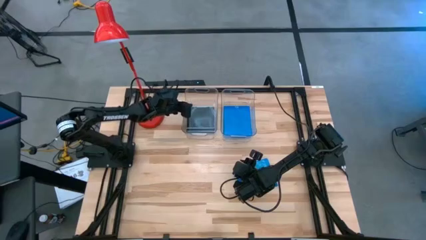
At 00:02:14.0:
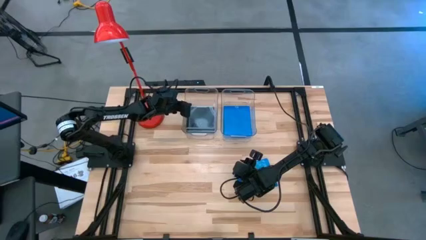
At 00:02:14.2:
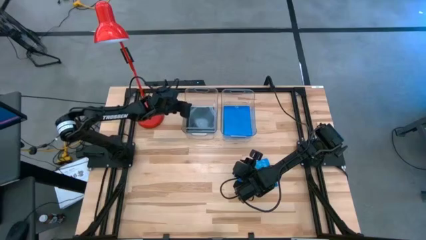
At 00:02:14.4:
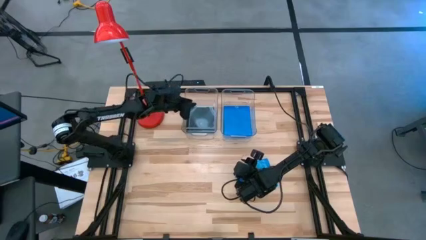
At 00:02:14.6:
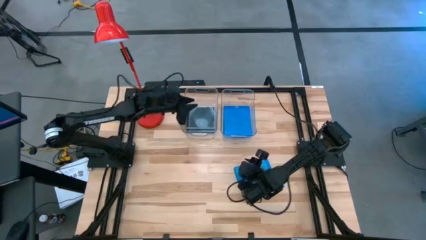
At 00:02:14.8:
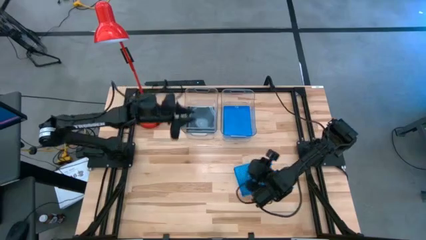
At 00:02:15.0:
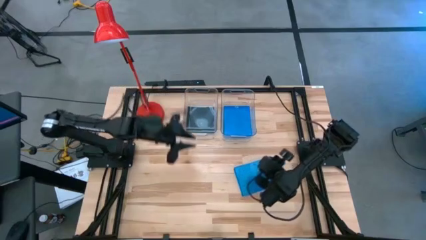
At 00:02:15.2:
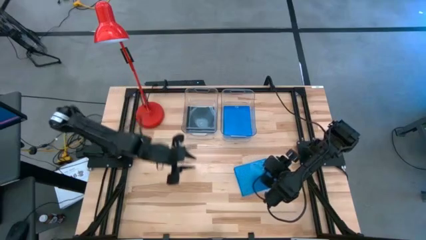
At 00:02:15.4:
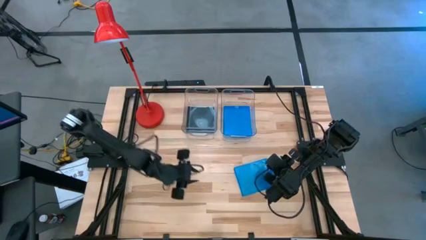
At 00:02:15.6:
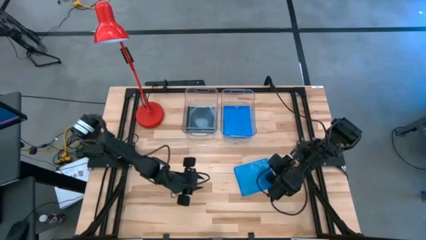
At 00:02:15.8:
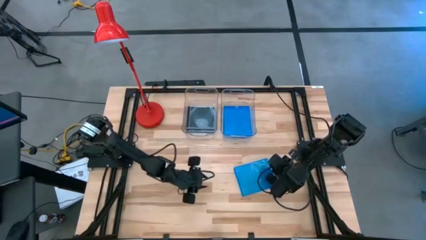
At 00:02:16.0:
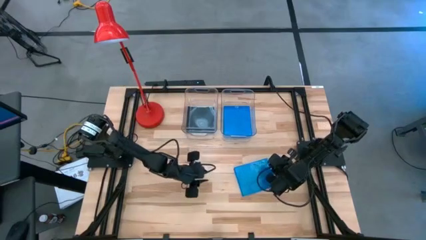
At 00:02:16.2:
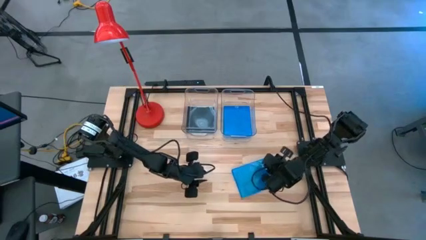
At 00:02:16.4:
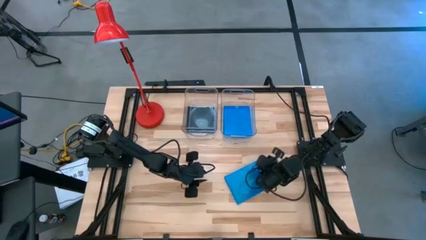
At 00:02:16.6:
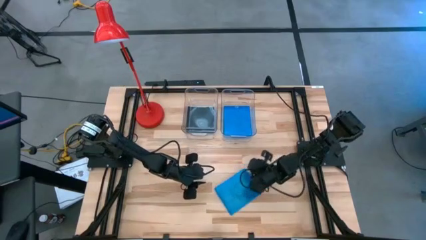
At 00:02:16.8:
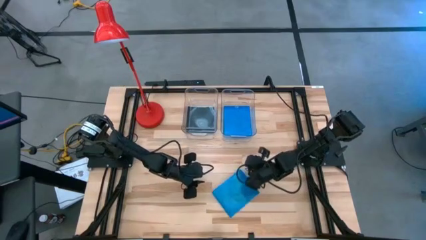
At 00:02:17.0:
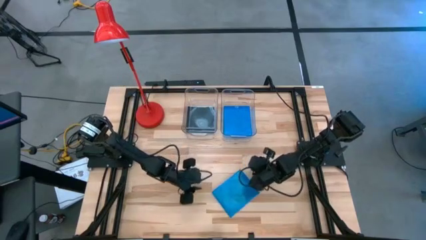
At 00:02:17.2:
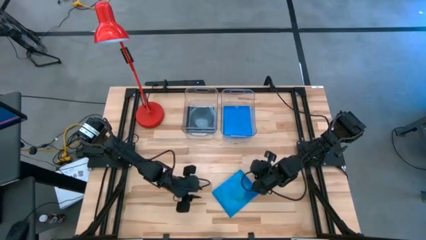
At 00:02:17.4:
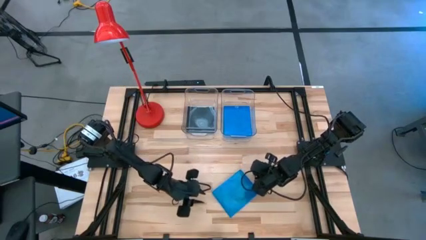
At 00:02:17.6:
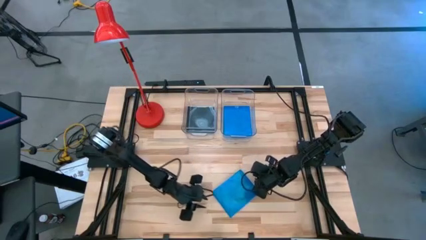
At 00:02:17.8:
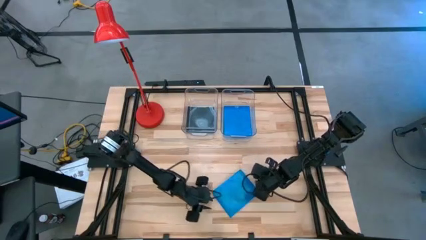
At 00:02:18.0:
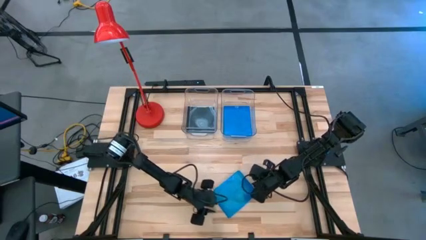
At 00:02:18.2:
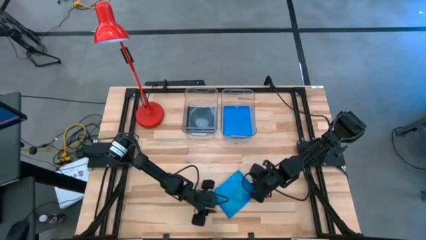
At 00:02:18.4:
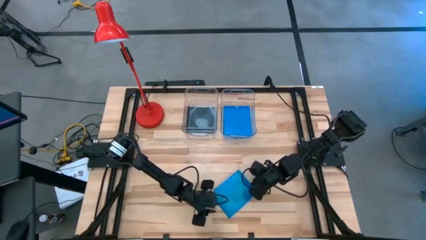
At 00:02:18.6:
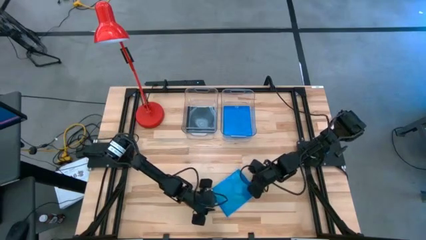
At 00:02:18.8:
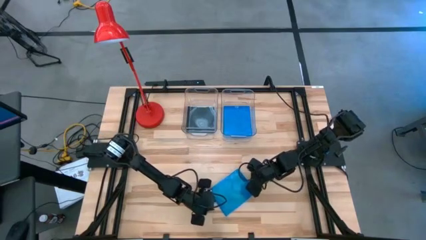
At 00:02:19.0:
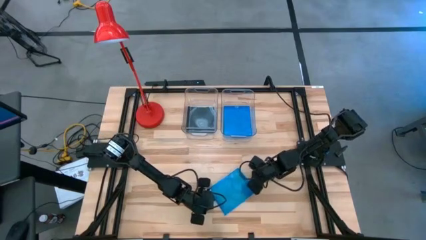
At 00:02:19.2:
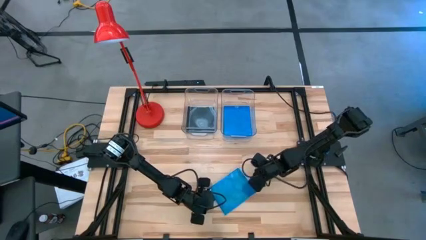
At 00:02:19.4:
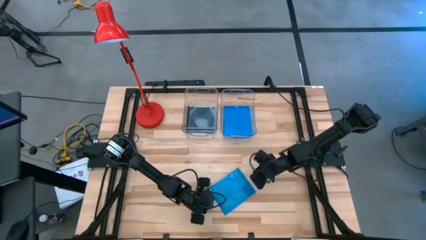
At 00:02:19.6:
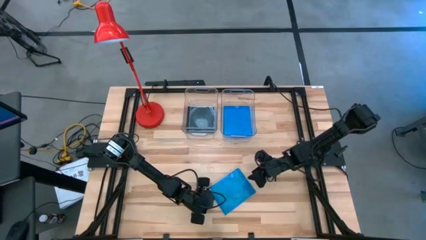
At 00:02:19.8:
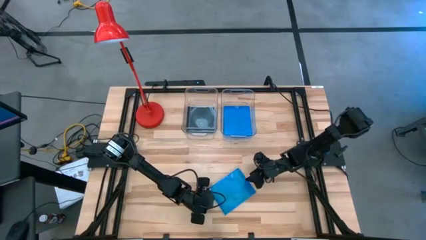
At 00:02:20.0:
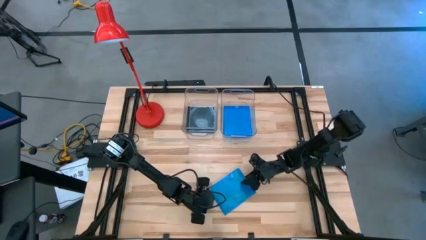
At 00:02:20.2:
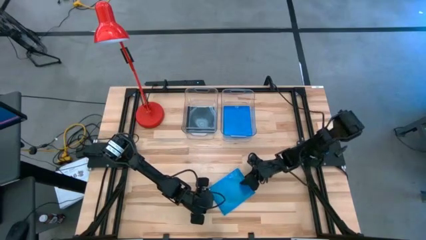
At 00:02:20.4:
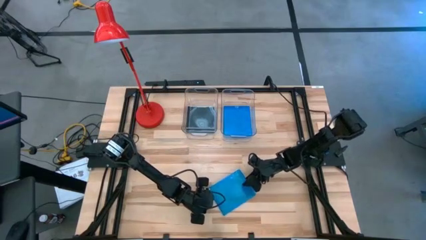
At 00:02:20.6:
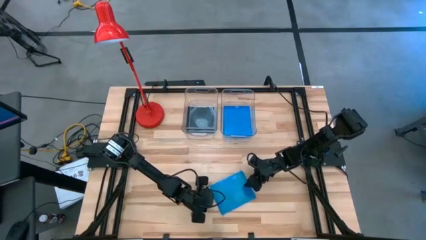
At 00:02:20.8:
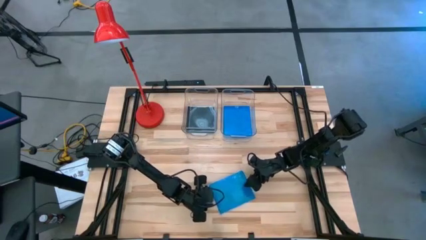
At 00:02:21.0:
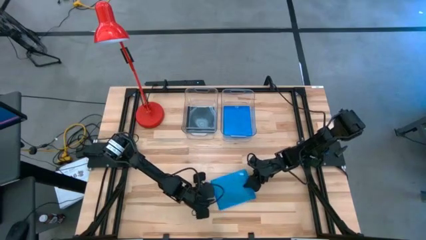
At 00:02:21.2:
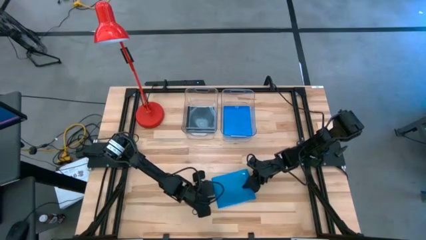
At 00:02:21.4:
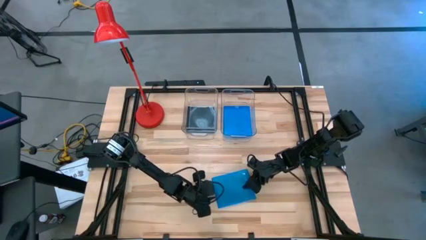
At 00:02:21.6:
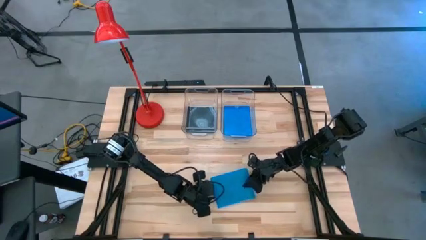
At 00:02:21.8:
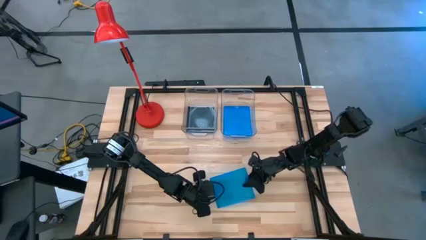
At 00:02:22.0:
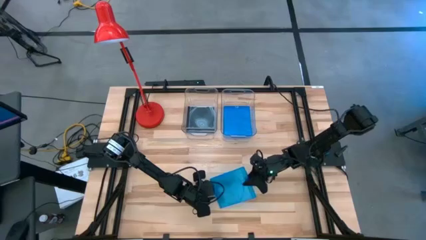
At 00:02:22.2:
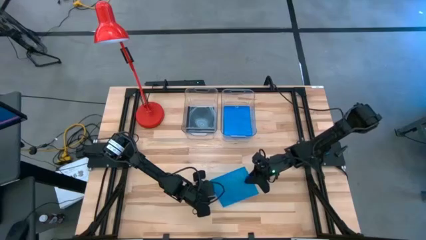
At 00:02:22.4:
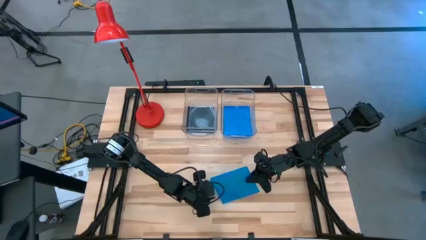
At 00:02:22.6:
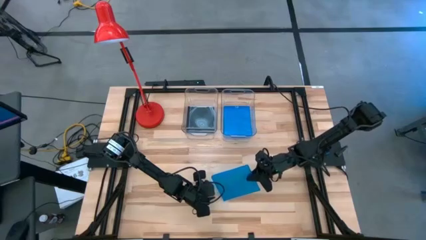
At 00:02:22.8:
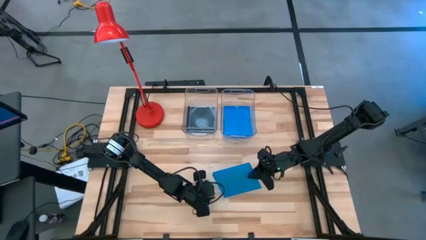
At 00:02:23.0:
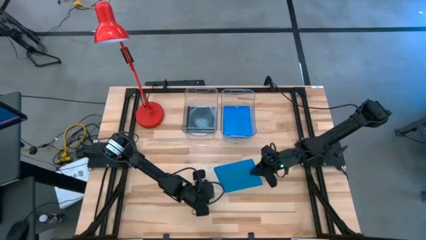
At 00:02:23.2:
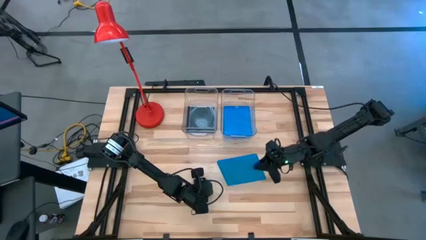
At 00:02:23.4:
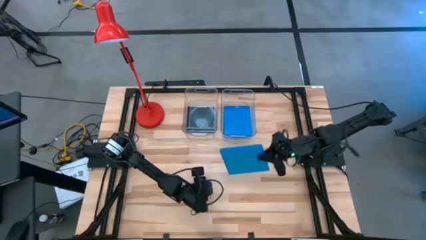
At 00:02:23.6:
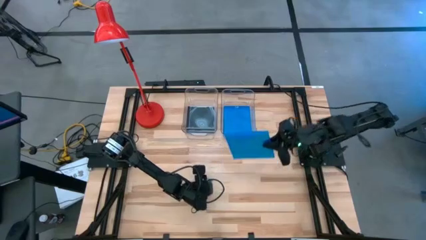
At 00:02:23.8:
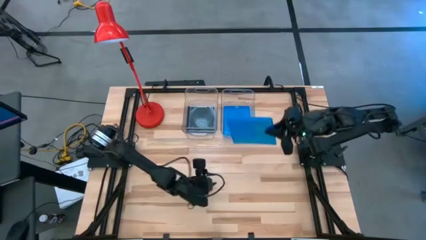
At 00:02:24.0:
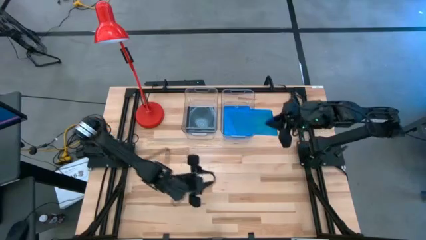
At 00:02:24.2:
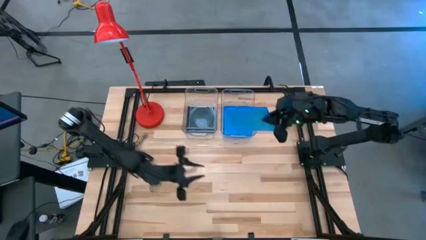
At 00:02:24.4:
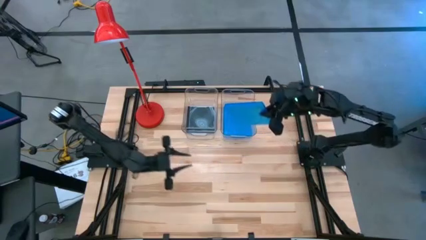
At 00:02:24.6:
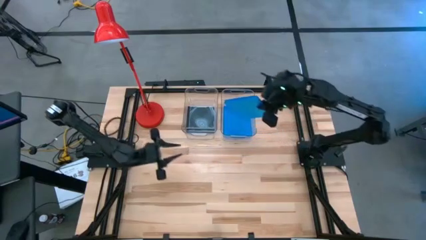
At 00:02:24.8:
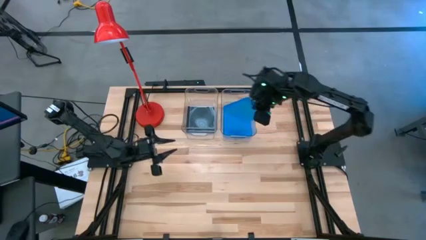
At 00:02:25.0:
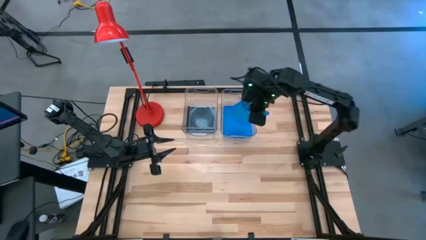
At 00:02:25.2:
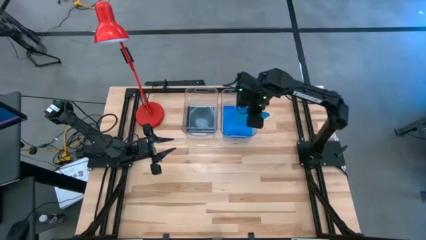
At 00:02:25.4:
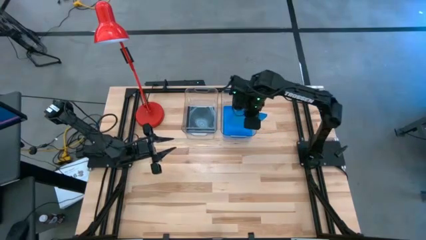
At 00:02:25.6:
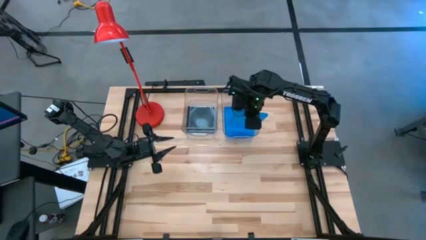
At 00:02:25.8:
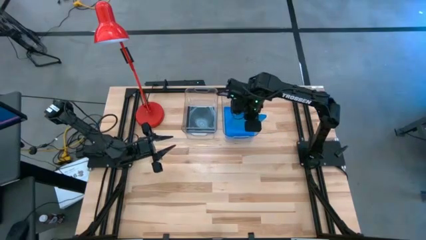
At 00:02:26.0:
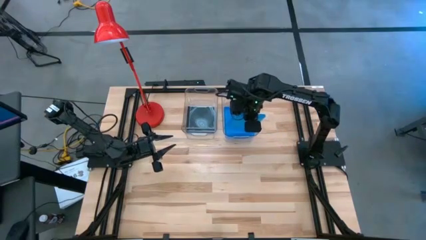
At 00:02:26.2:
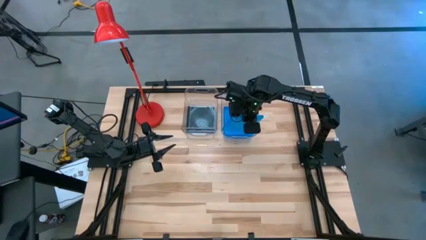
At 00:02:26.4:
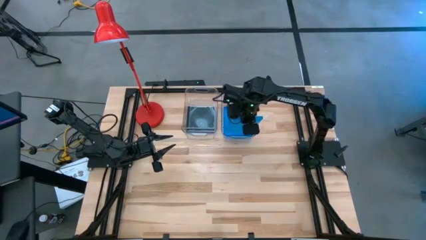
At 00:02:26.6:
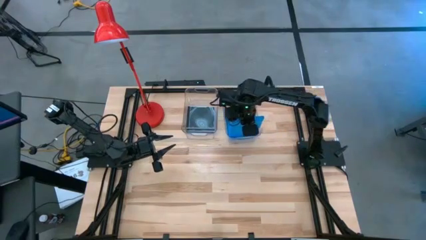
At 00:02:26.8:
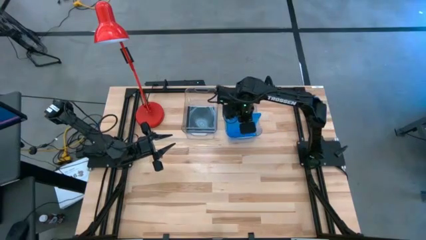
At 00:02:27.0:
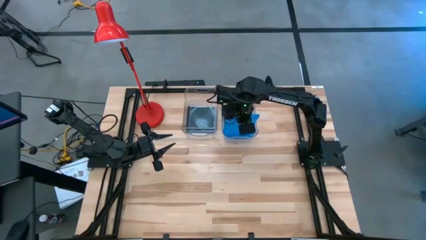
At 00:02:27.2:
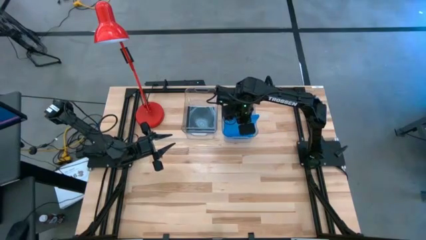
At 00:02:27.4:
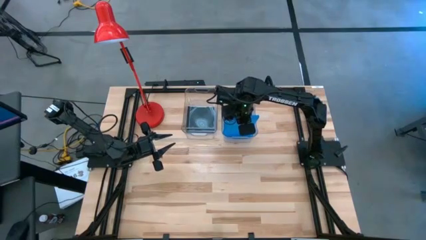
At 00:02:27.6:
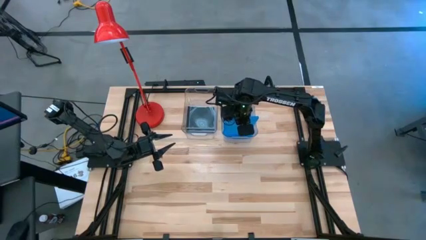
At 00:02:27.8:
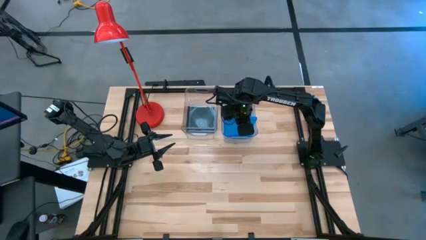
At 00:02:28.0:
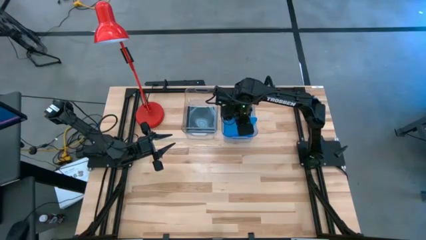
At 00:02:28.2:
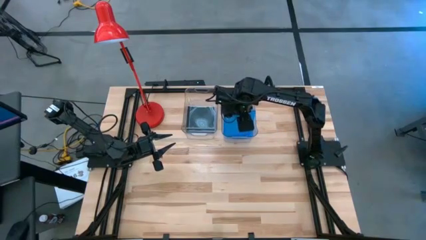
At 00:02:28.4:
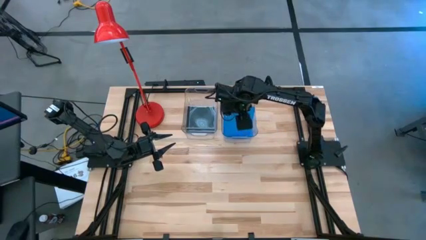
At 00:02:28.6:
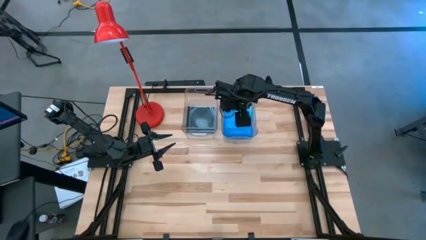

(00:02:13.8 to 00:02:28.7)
Task: Pick & place jewel cases by type
Put the blue cd case into the right transparent bin

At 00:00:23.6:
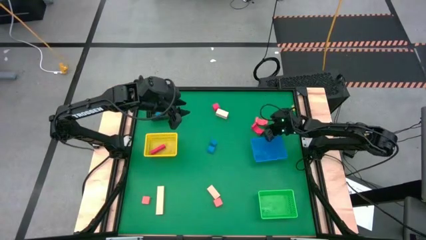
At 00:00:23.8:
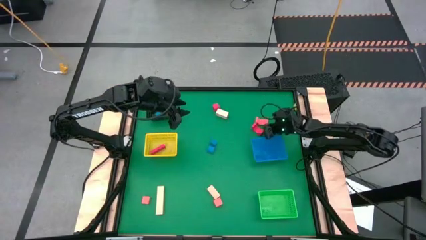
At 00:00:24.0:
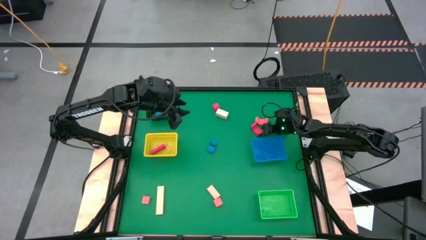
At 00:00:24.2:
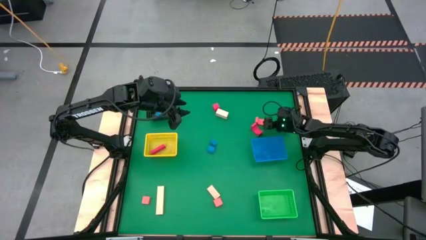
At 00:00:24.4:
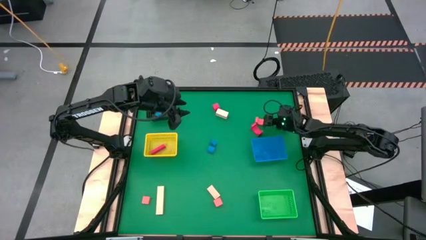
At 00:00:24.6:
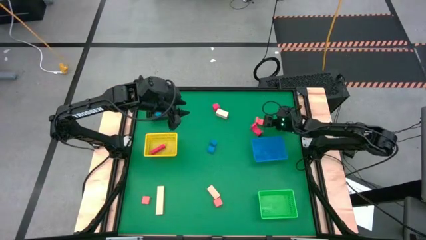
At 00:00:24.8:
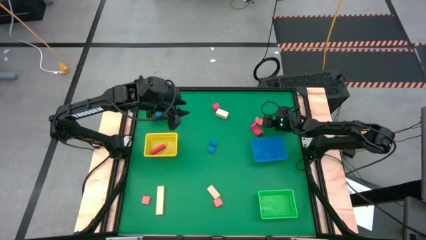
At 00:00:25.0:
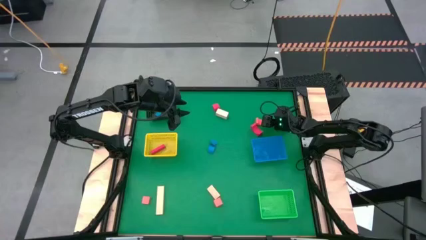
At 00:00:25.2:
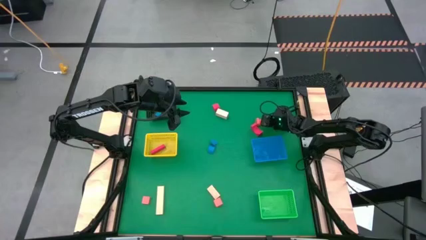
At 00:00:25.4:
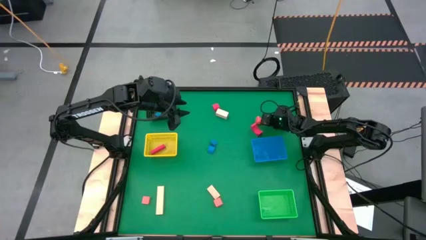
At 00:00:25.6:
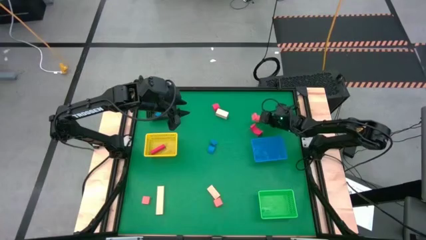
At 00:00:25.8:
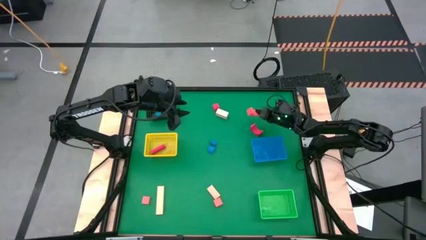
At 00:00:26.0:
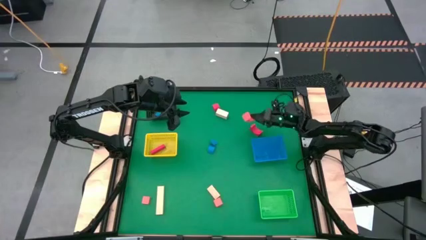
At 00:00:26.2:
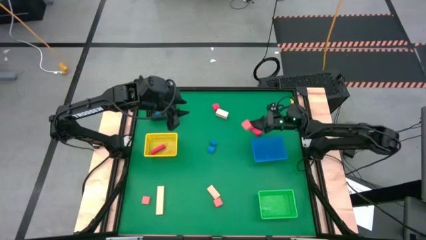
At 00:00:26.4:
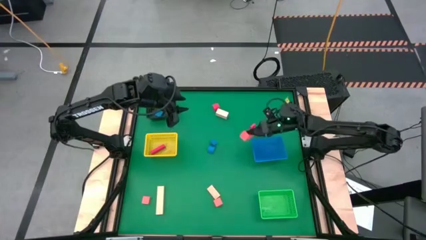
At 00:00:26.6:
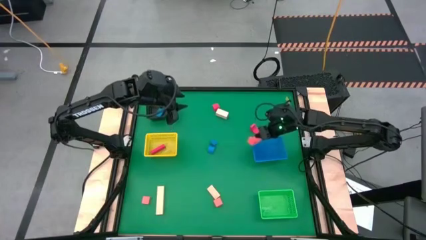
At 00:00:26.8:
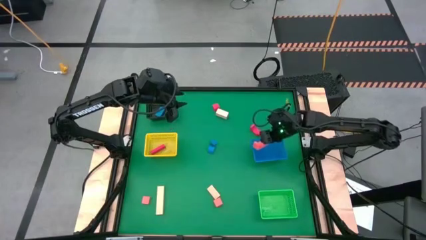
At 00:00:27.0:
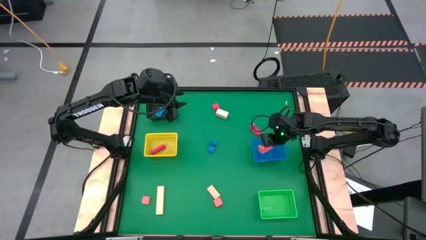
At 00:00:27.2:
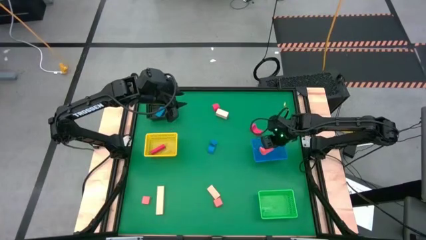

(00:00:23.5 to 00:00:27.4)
Task: Sort & place blocks by color
Put the top right orange block into the blue bin
